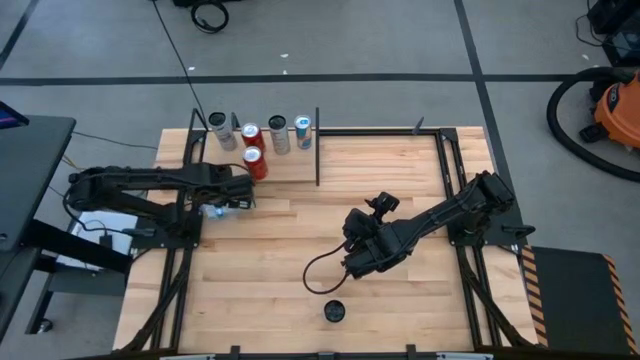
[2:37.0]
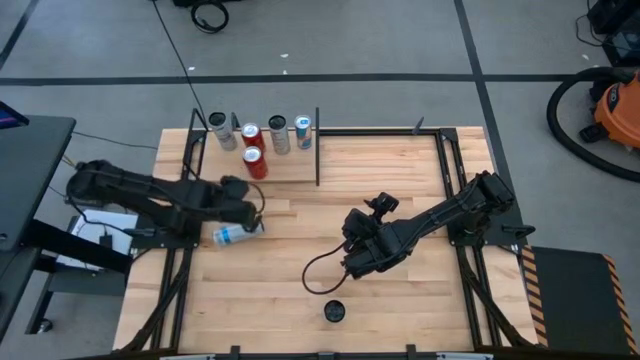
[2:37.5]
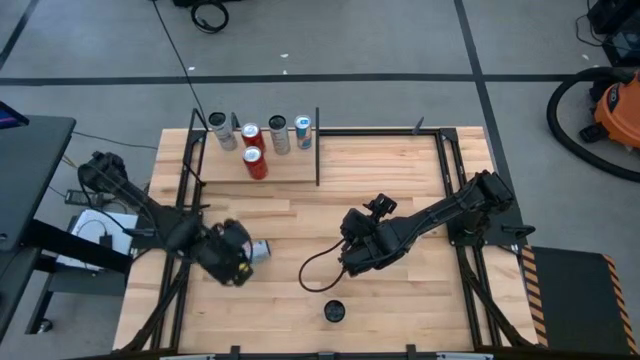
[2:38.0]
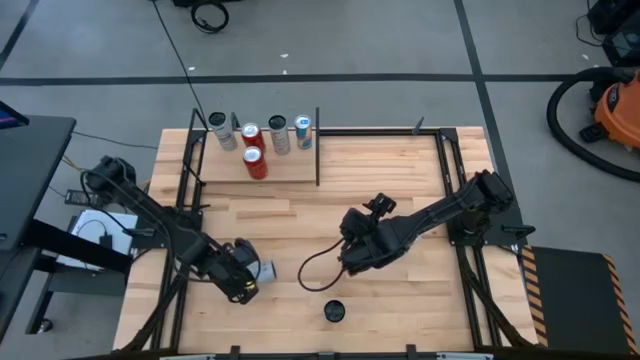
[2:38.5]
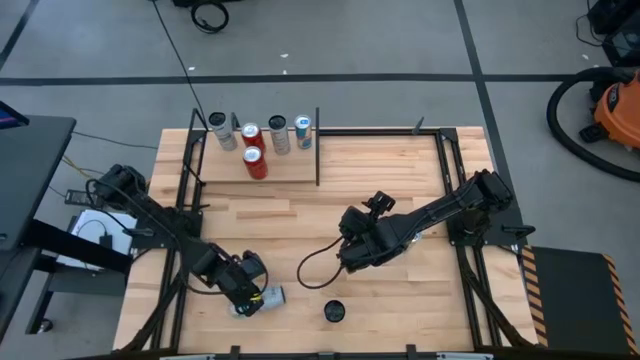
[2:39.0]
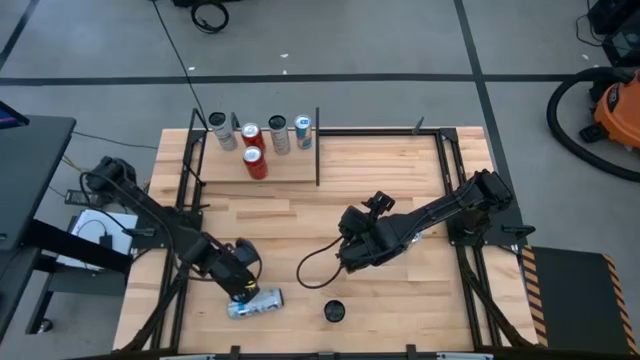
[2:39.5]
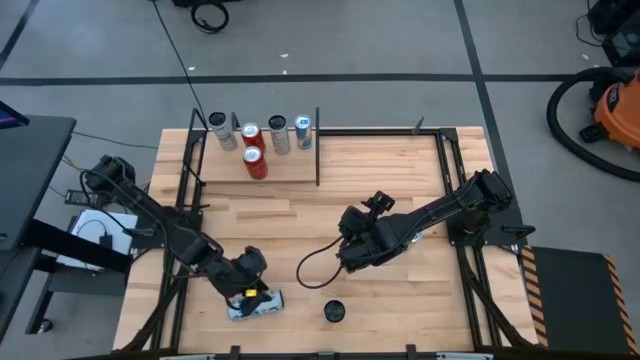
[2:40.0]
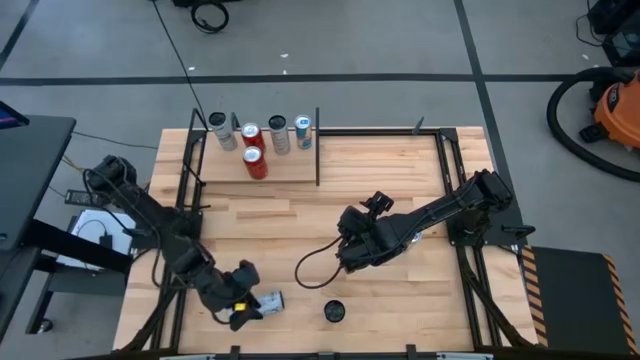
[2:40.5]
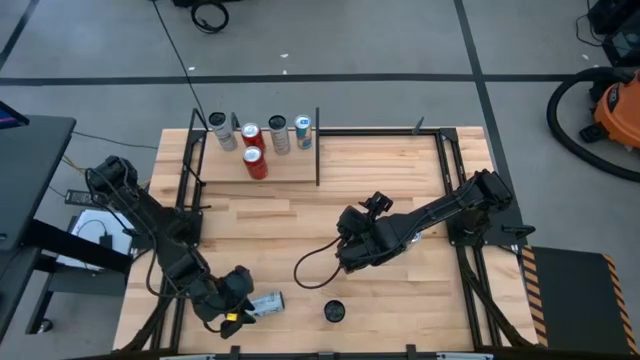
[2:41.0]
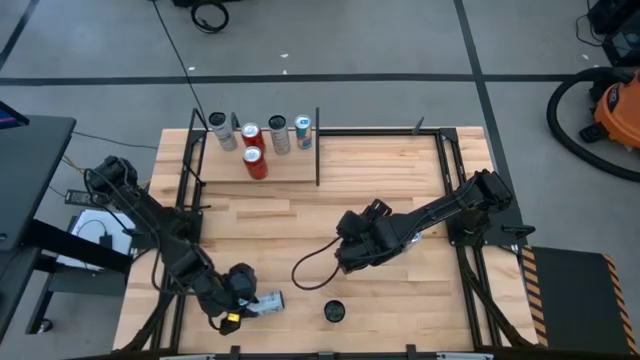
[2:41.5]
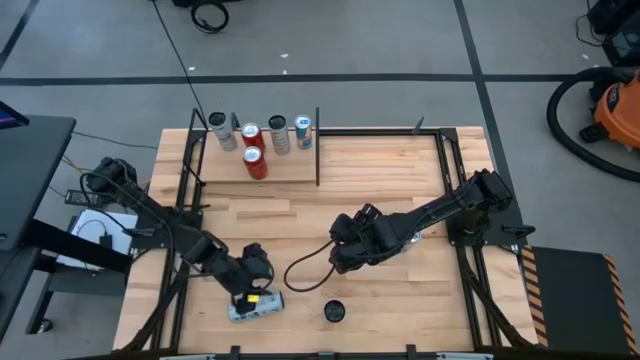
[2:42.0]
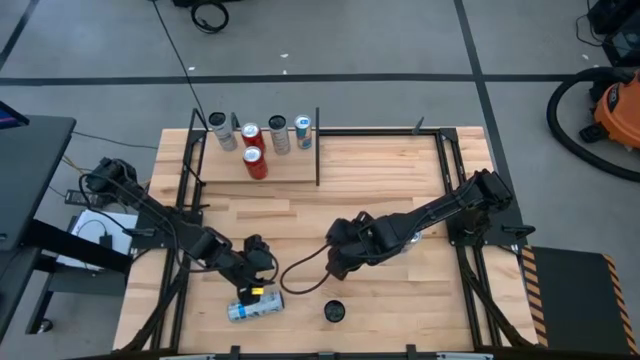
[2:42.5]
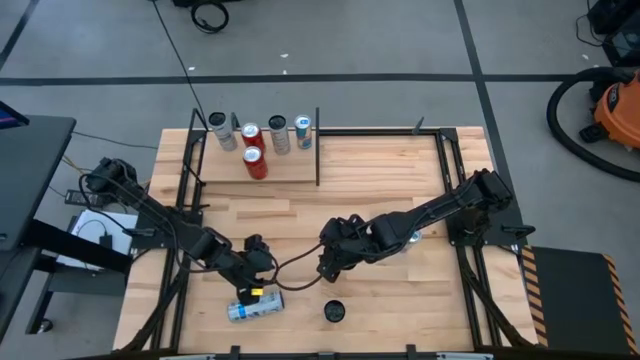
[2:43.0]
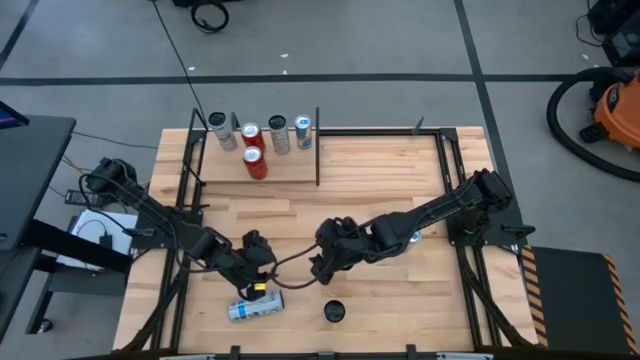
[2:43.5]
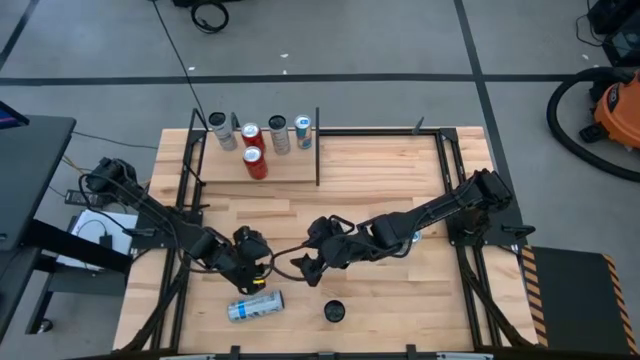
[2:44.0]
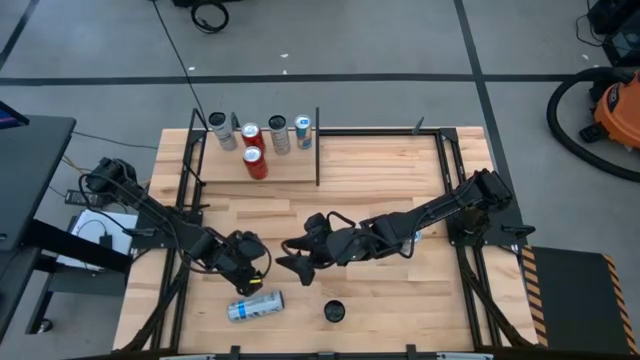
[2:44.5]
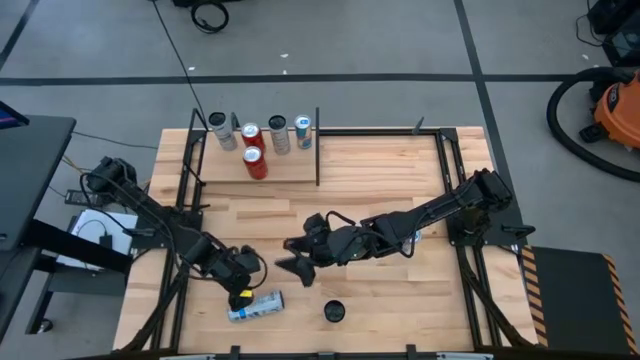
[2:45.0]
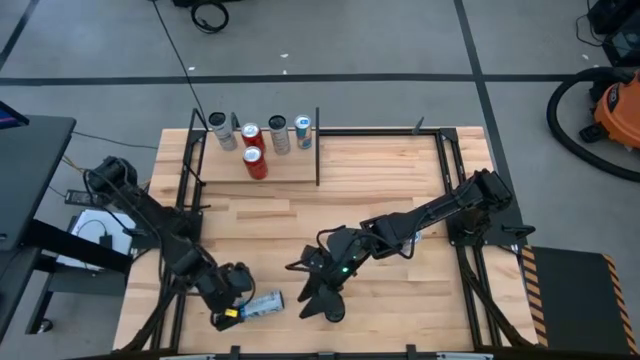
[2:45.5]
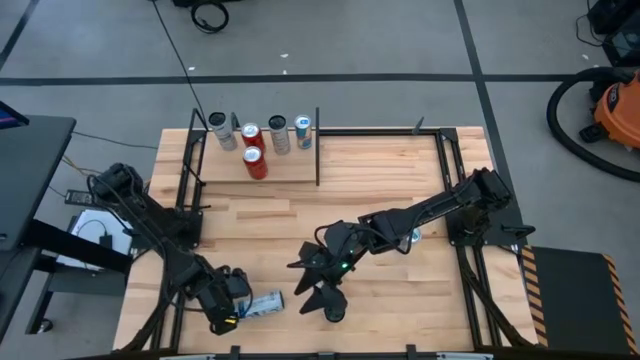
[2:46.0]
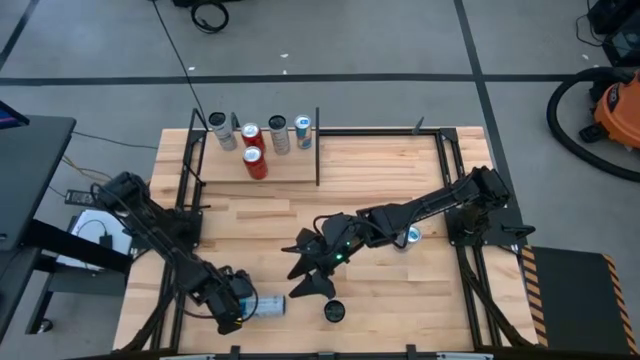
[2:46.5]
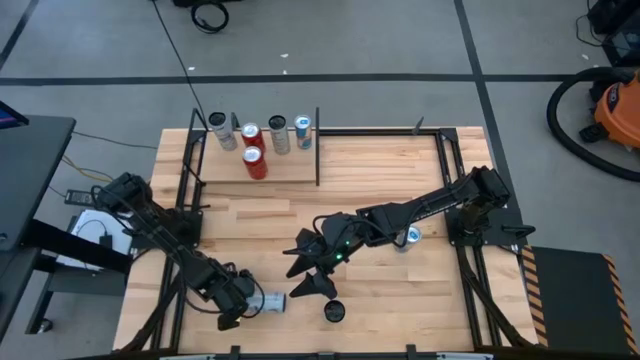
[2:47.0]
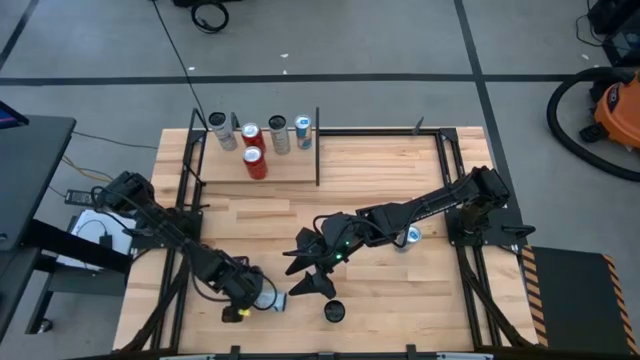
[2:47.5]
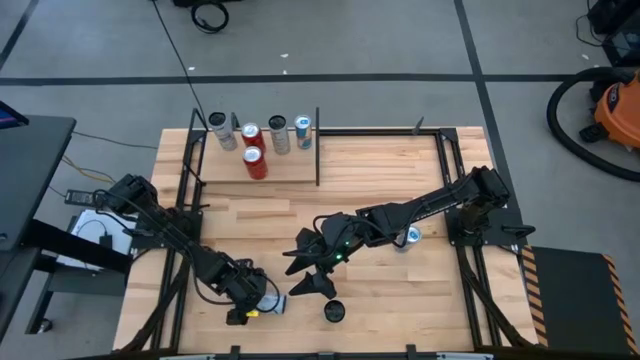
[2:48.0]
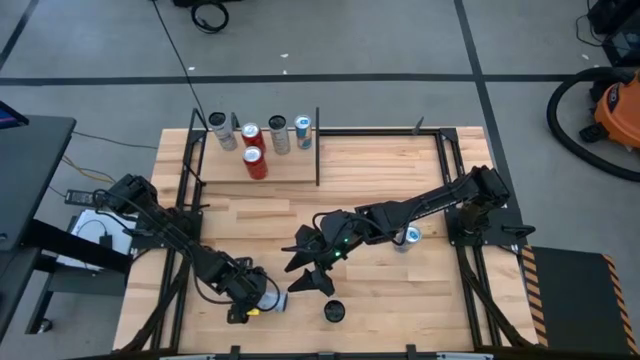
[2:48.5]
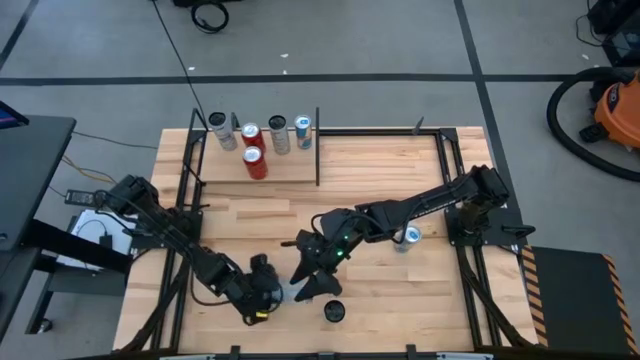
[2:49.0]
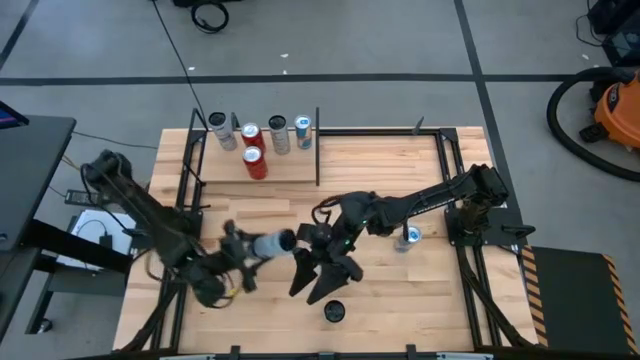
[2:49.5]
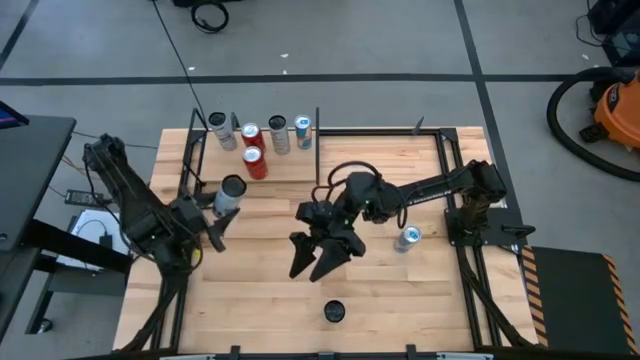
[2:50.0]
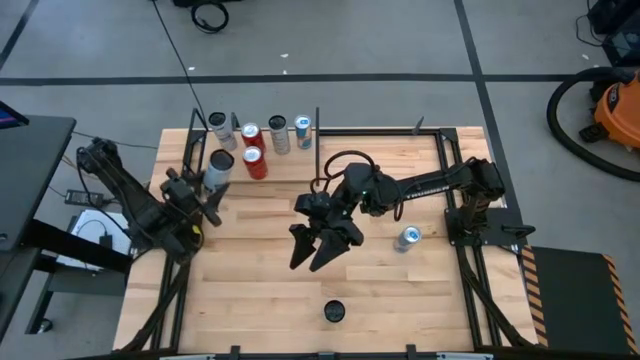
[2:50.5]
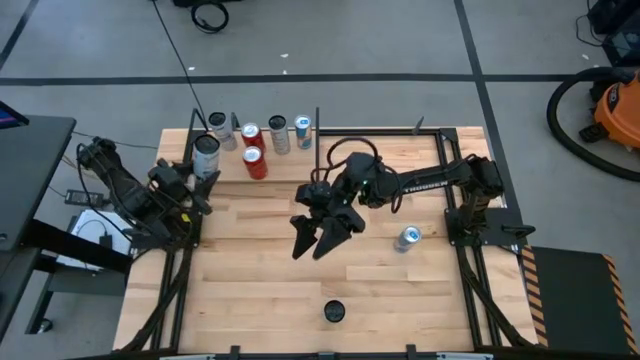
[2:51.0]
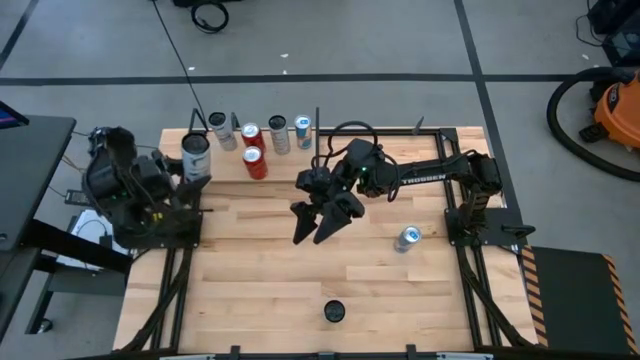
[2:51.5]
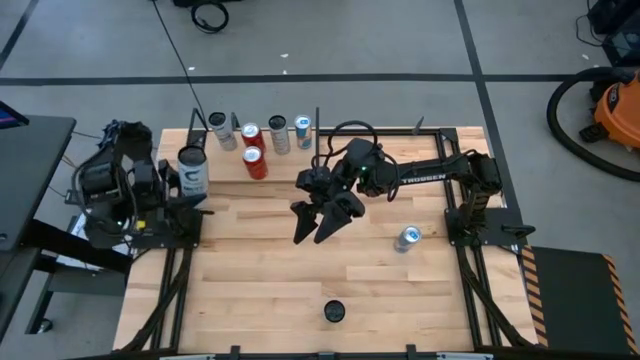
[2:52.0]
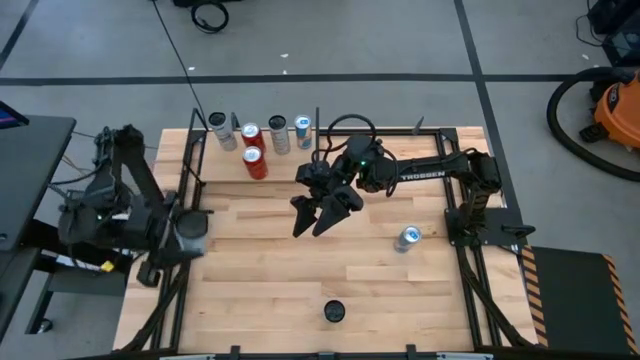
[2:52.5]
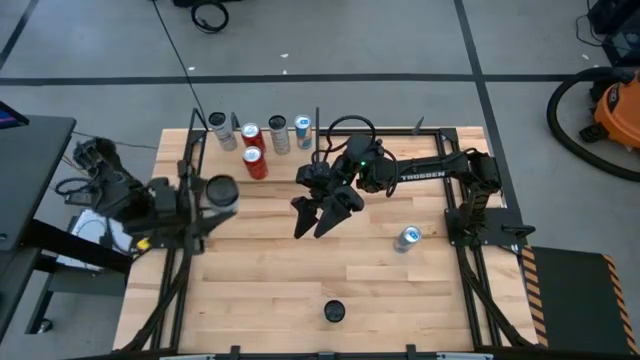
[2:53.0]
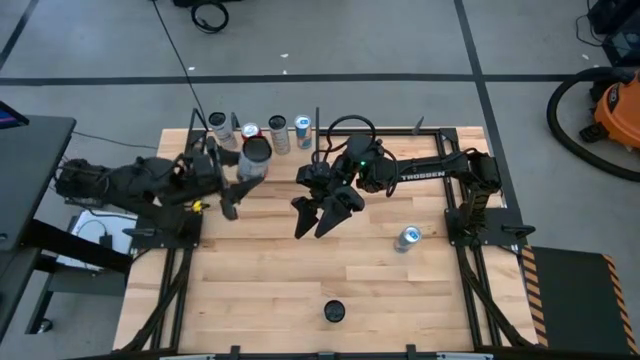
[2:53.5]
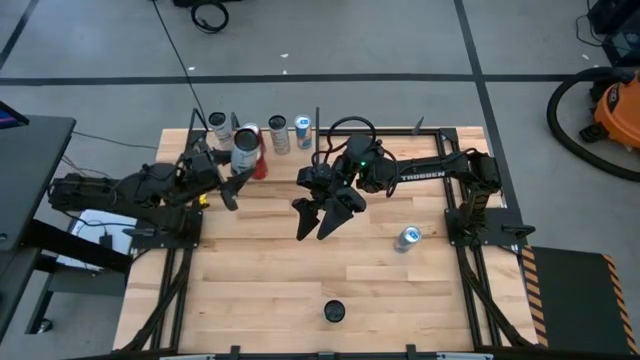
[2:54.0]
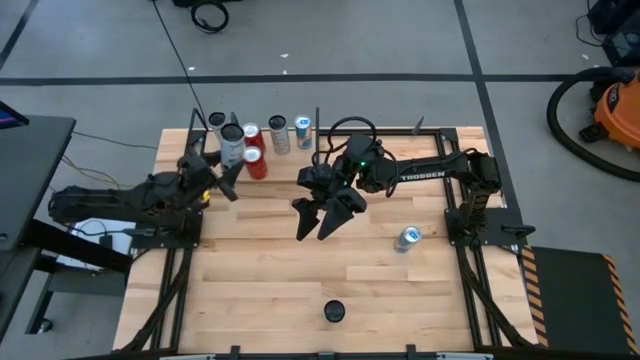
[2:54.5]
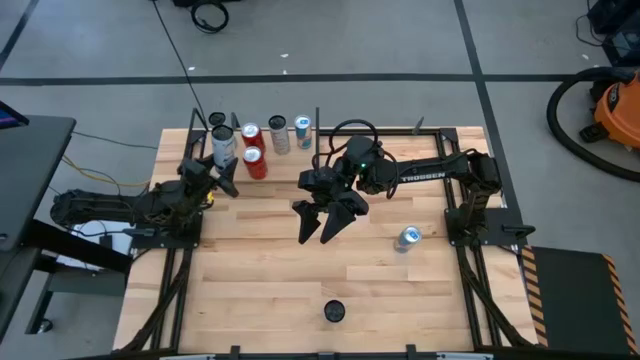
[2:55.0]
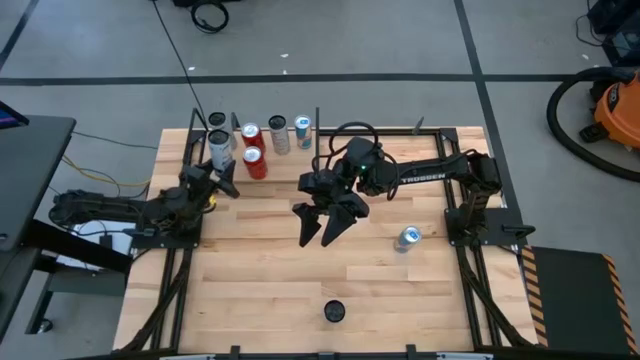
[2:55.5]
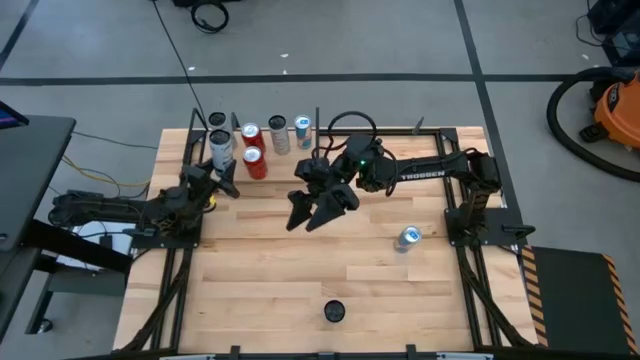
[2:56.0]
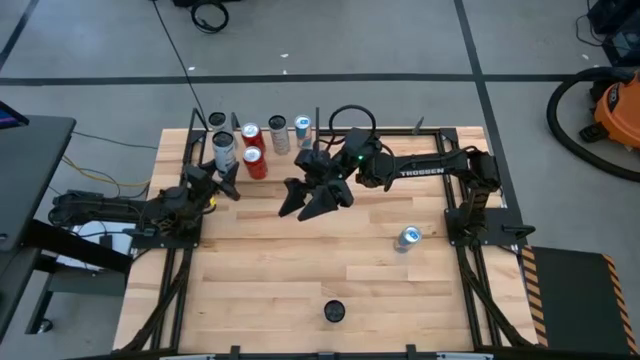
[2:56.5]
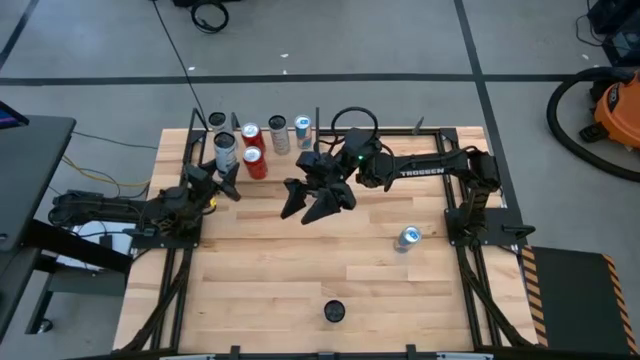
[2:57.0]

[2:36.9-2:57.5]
Task: Place canned beverage on shelf
Put the blue-white soda can on the shelf aligned with the other blue-white soda can
